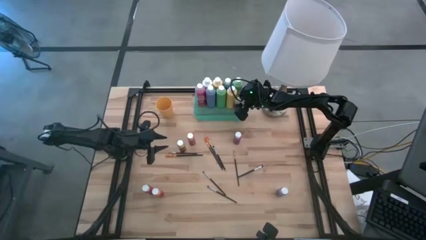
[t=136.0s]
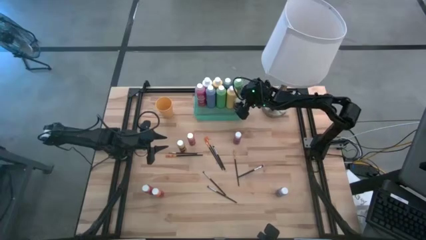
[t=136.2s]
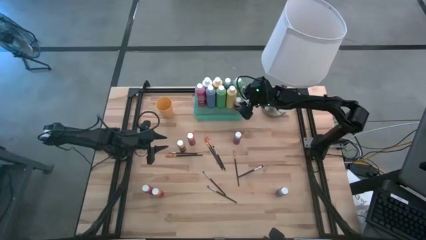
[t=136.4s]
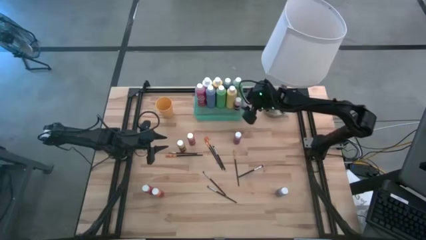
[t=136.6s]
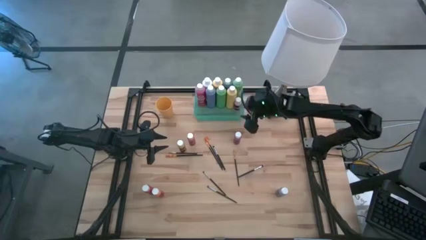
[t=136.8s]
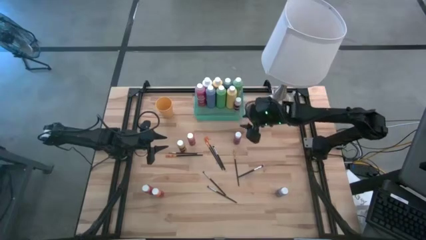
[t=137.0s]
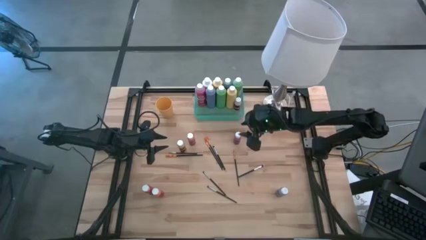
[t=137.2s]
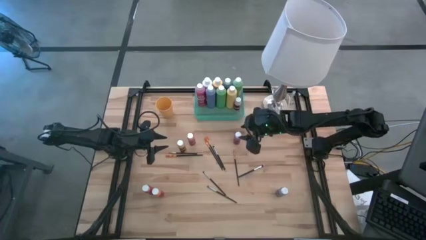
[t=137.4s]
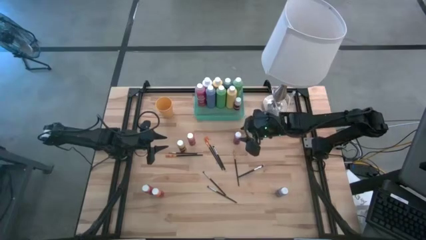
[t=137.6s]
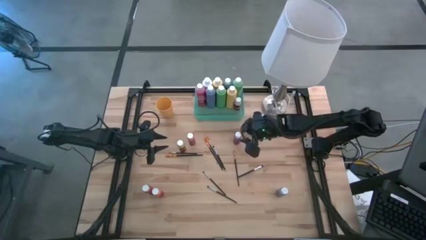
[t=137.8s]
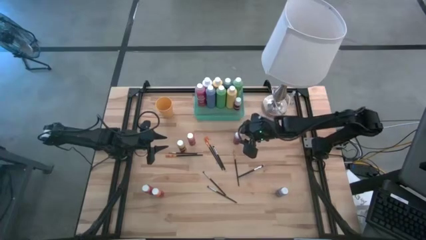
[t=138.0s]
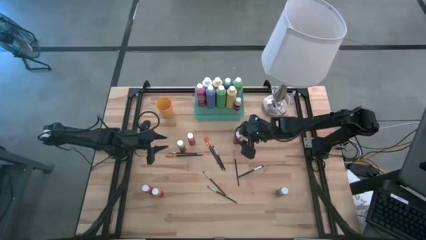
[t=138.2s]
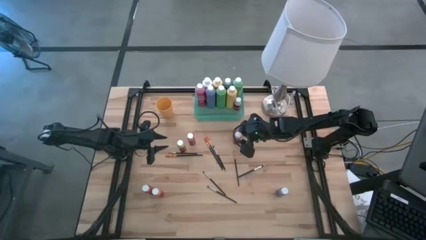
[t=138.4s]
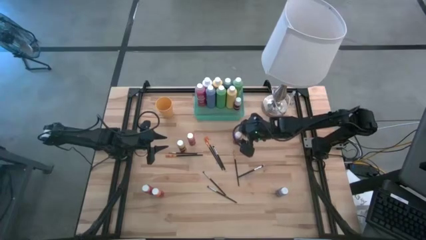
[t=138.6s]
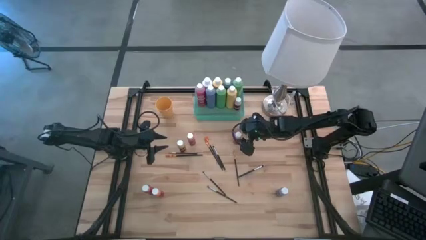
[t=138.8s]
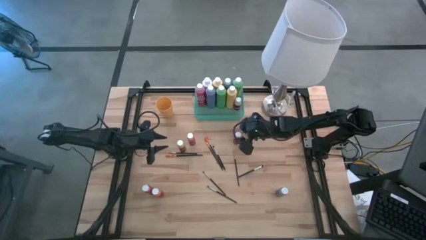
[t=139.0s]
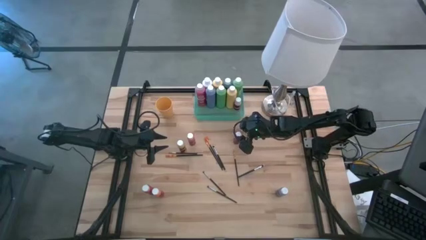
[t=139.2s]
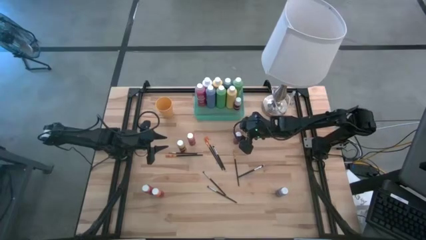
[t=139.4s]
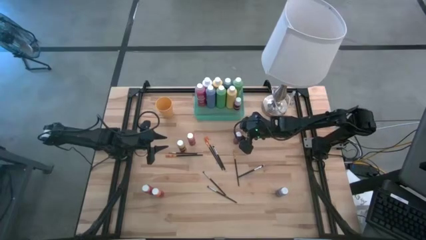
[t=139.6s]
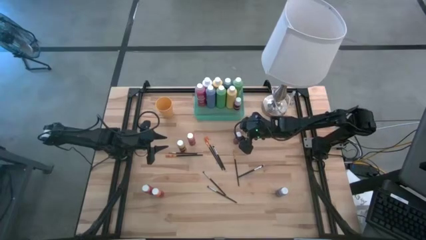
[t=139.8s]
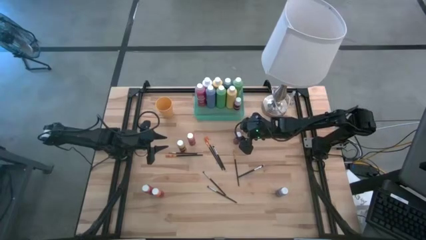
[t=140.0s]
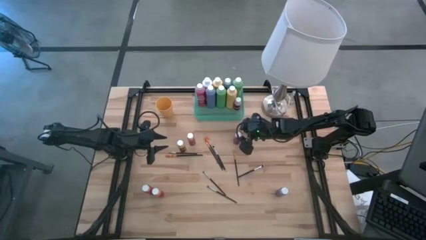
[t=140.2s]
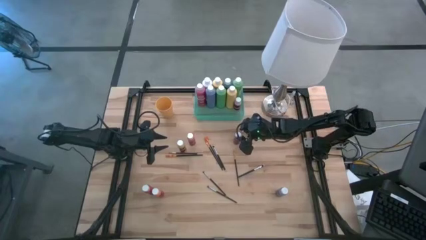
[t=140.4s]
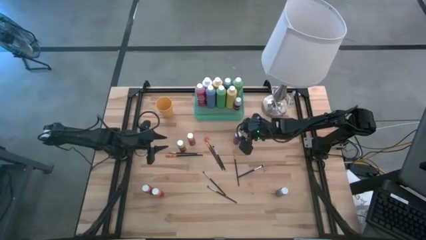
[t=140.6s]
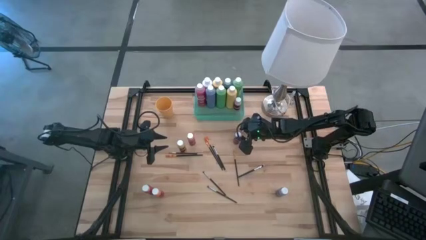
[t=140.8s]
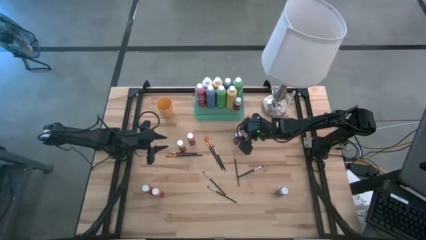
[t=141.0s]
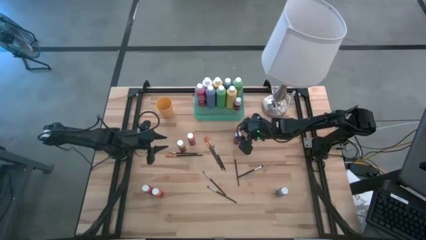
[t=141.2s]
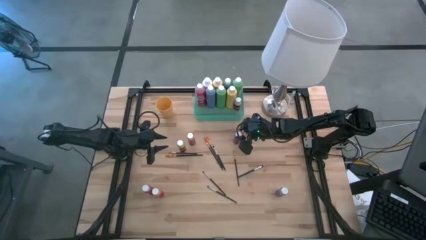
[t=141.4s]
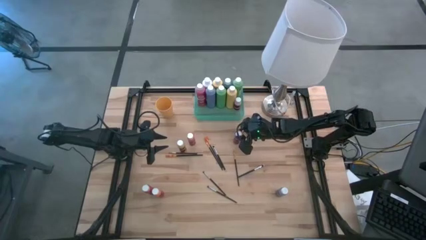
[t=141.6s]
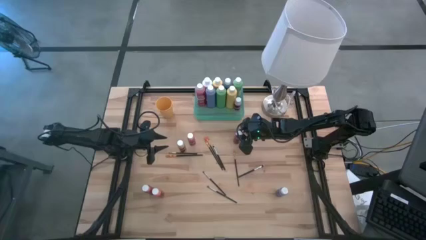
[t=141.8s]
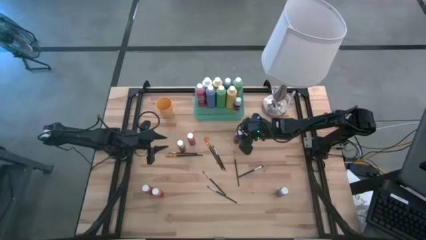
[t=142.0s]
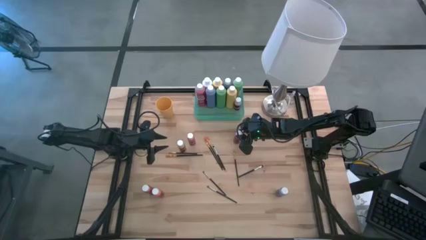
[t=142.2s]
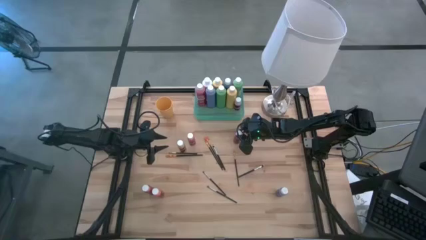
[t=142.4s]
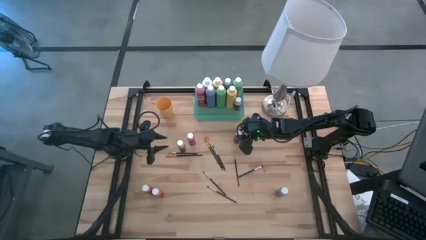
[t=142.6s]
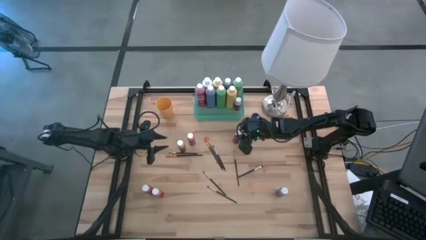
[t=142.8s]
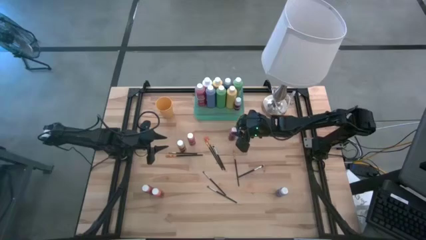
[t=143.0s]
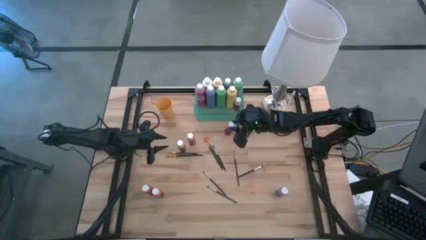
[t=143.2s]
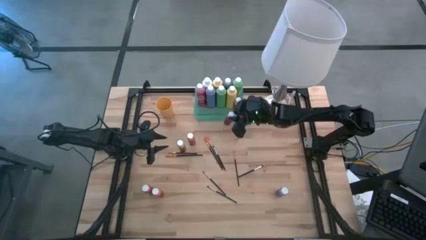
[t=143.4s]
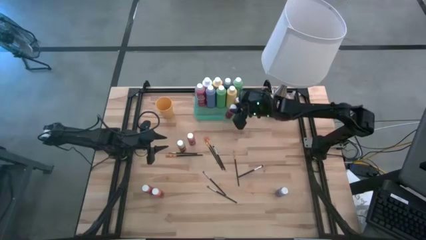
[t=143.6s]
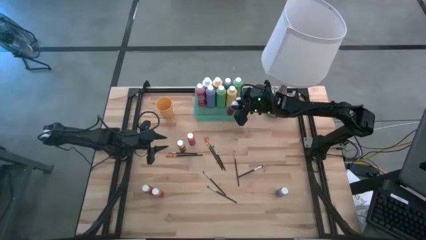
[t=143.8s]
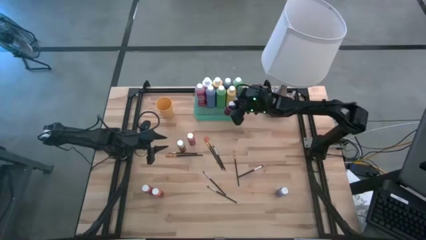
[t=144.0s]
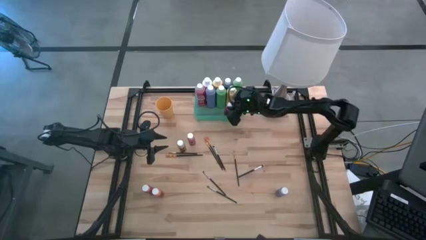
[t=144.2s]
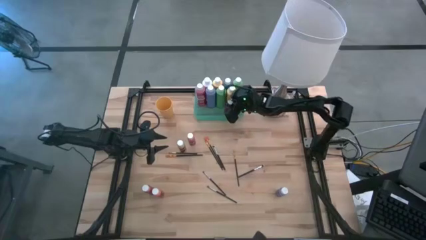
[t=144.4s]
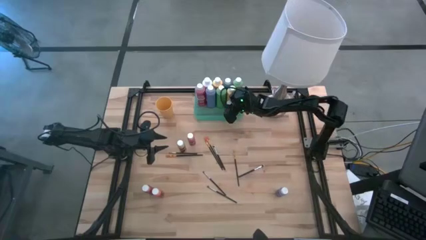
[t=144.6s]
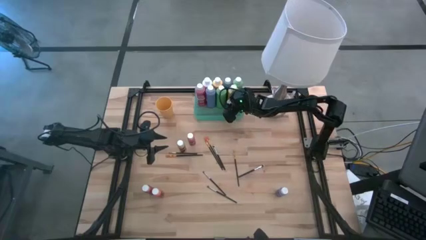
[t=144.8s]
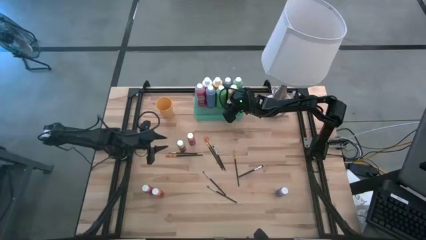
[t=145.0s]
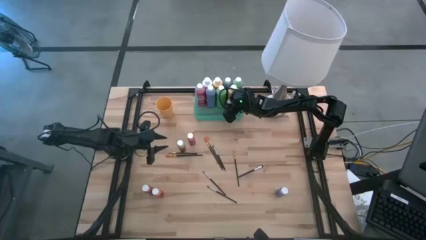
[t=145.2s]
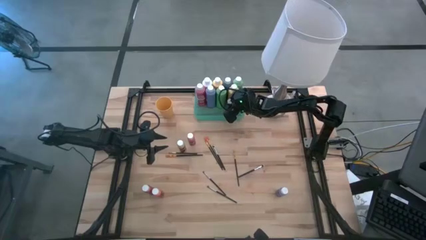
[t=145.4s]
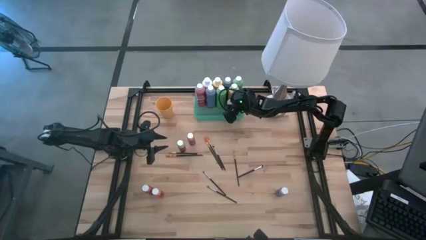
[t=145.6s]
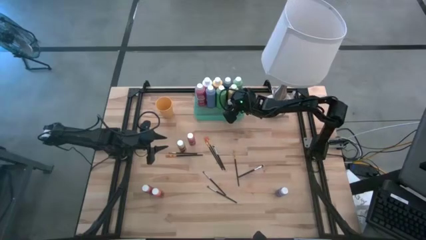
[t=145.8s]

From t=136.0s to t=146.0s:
Task: Pick & Place Paint Supplies
Put the small pink paint bottle into the green bin

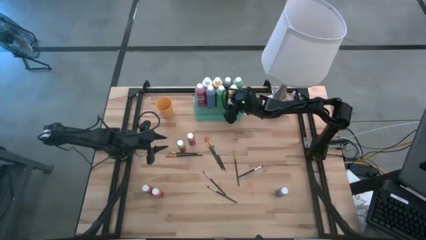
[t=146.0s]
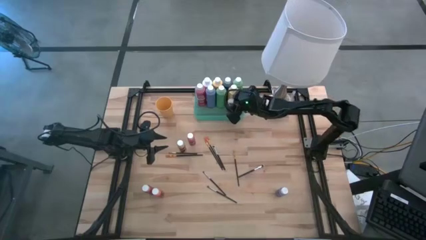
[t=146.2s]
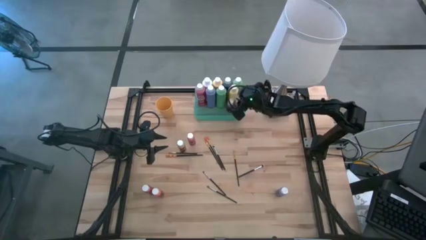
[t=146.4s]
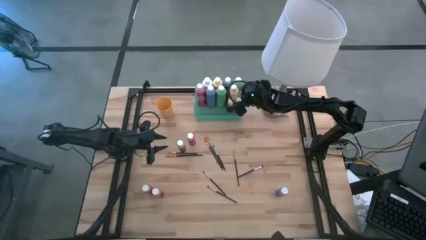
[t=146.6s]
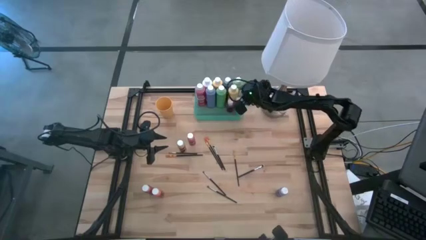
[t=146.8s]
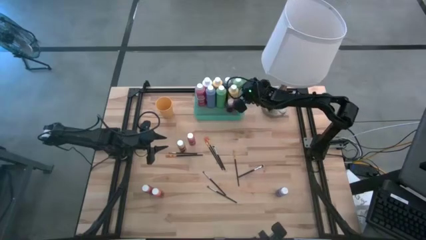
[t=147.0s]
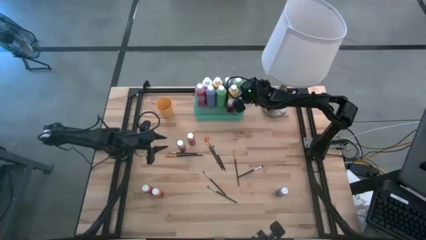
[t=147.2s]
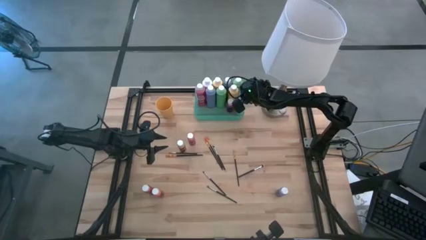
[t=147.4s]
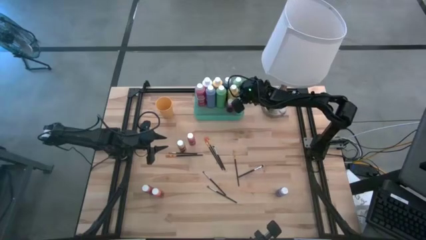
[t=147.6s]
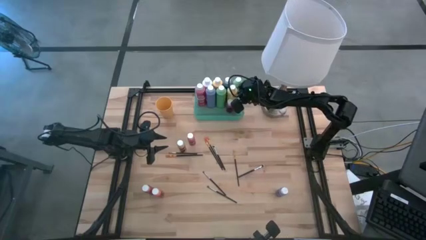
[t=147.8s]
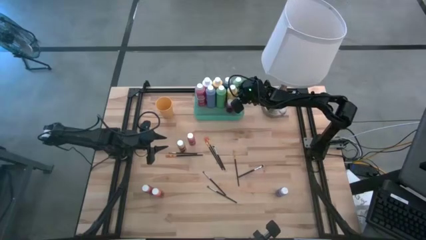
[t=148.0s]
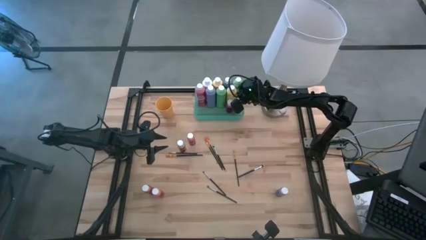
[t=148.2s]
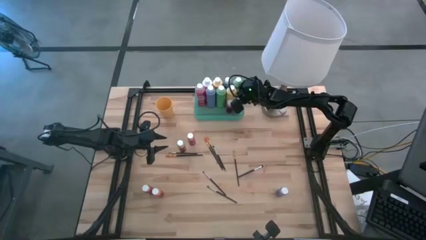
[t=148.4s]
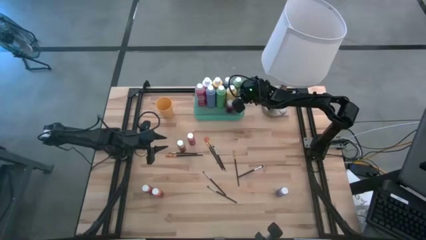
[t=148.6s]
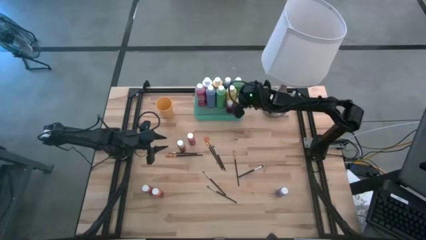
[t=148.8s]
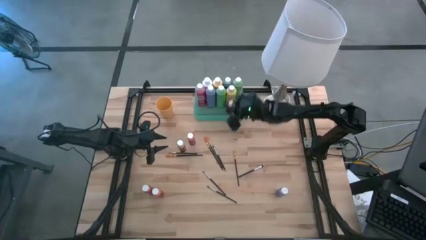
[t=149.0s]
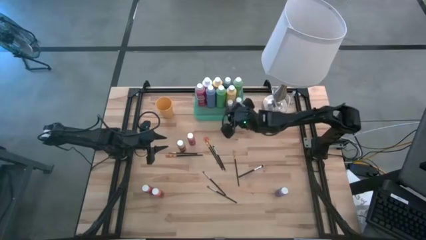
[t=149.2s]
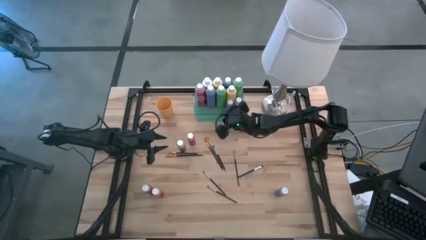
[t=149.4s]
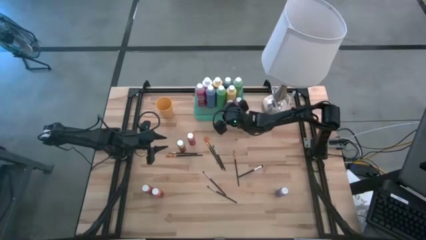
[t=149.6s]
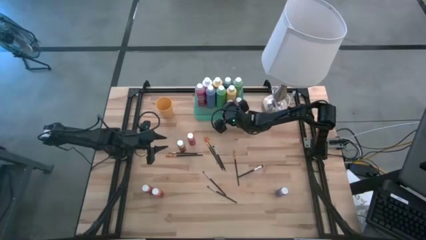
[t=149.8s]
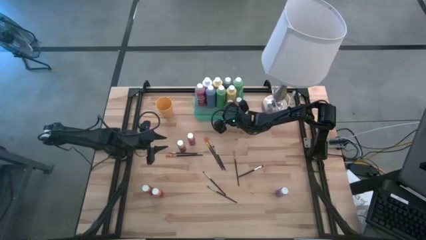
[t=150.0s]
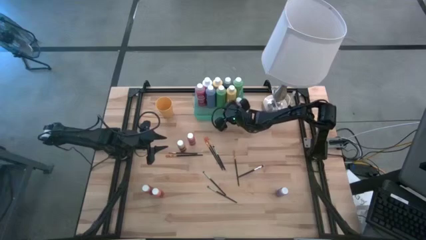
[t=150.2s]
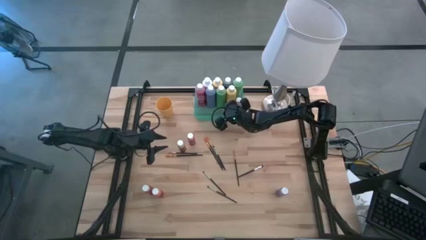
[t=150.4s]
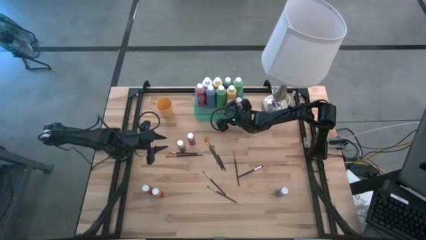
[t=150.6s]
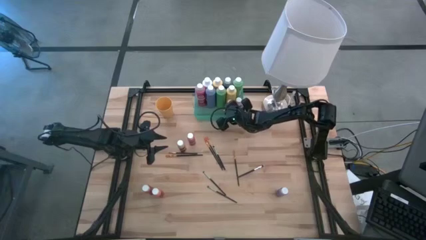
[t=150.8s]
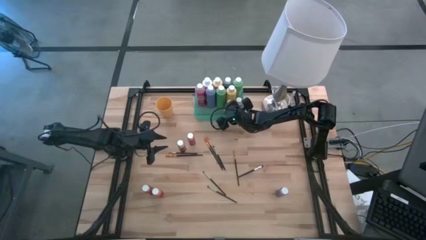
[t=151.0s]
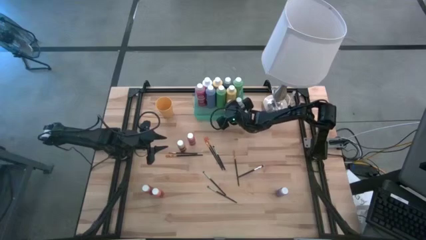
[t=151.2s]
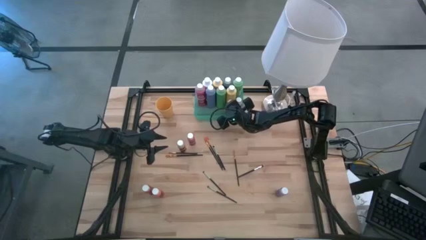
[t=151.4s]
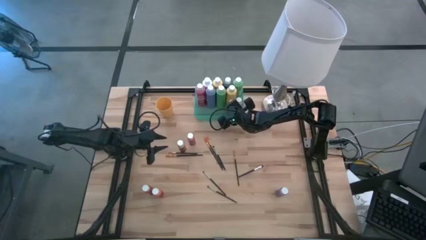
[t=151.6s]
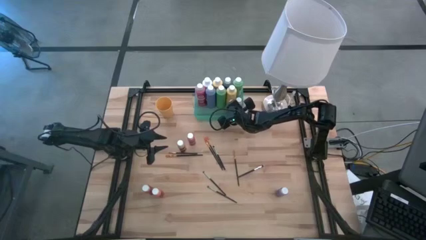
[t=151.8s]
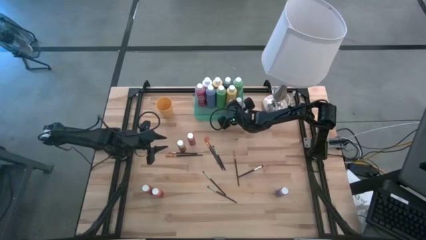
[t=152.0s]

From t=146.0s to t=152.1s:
Adjust the paint bottles in the green bin
